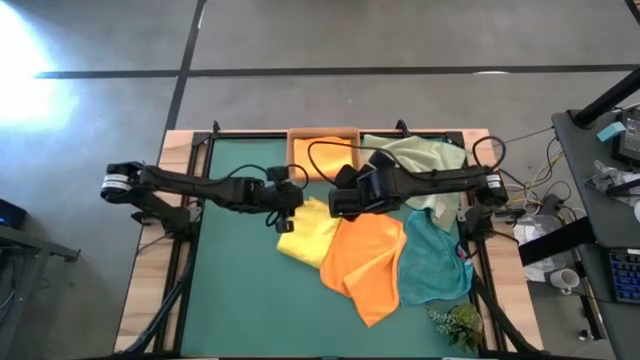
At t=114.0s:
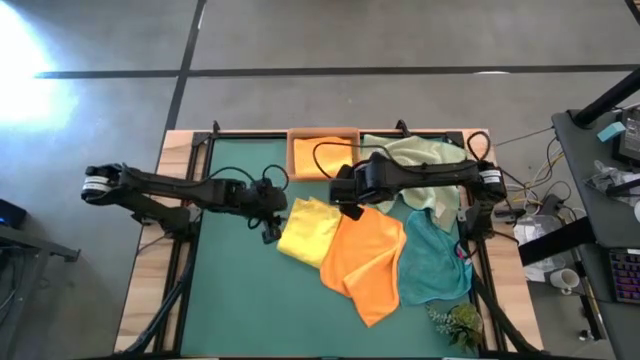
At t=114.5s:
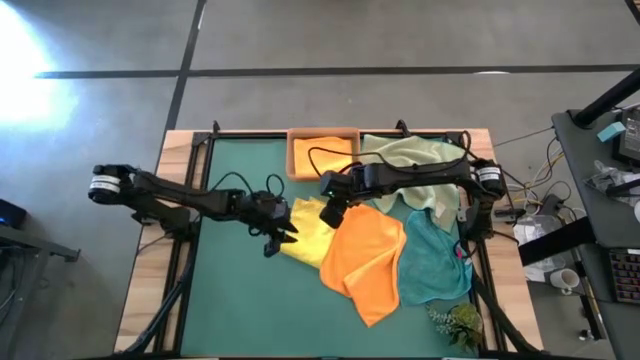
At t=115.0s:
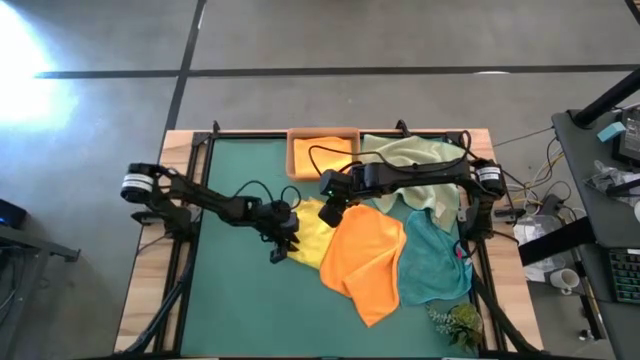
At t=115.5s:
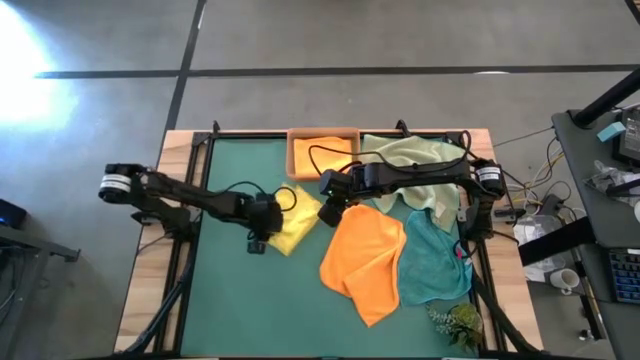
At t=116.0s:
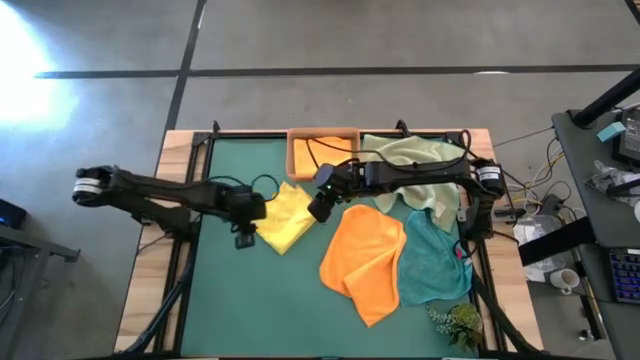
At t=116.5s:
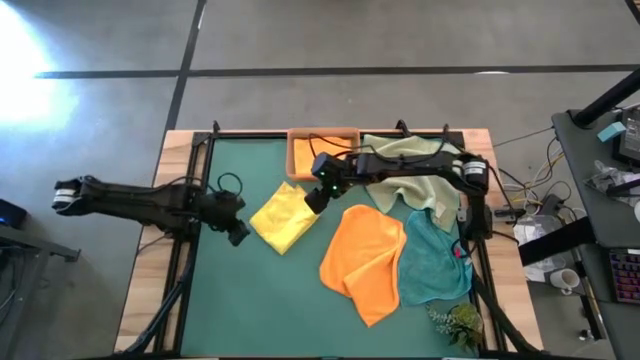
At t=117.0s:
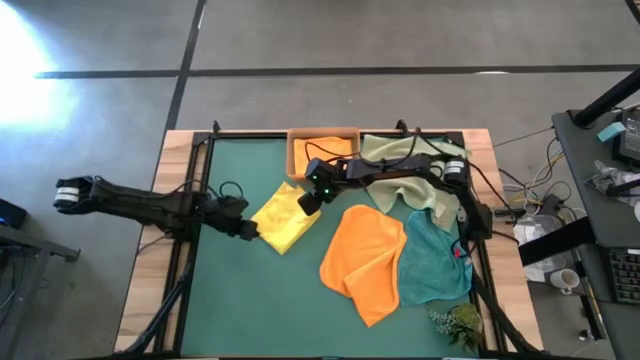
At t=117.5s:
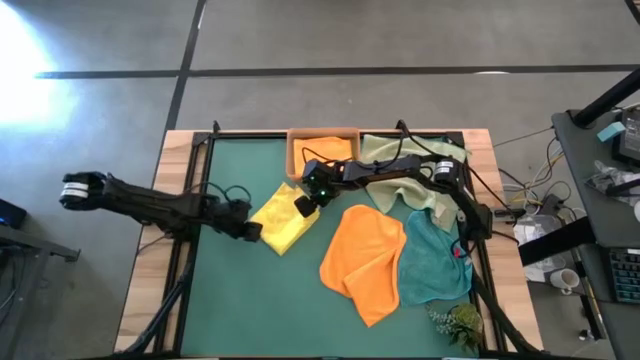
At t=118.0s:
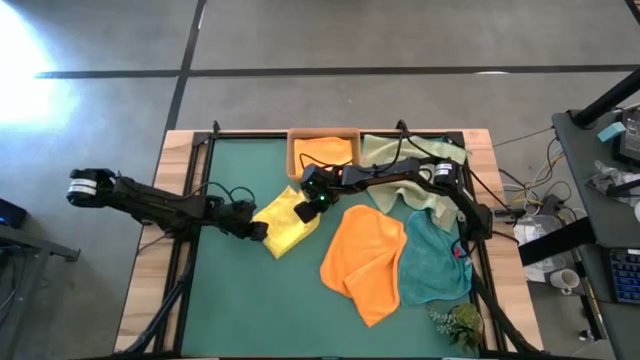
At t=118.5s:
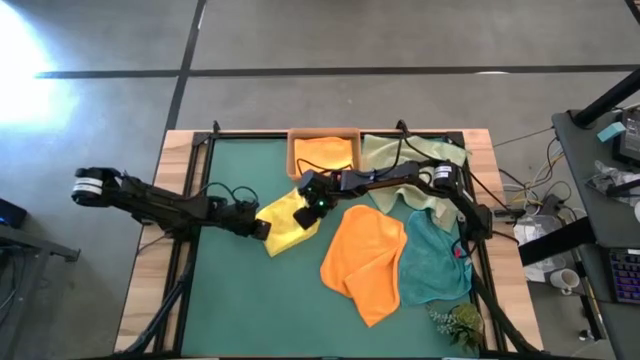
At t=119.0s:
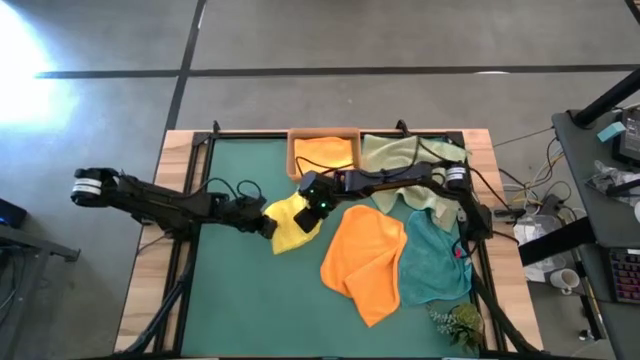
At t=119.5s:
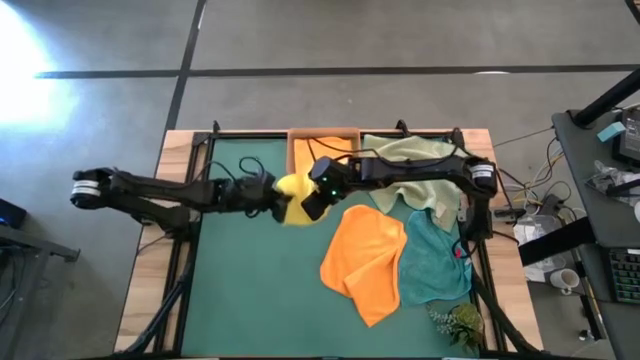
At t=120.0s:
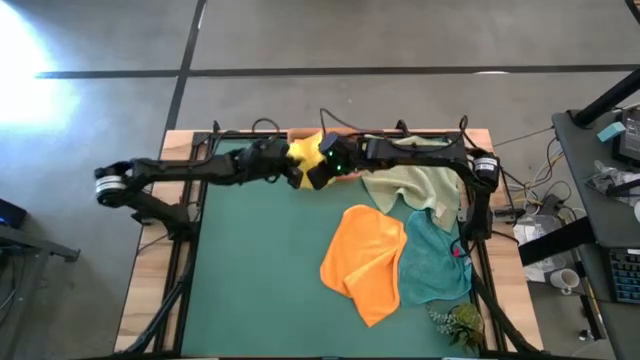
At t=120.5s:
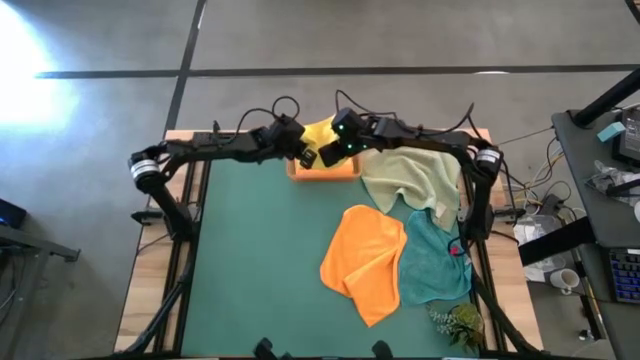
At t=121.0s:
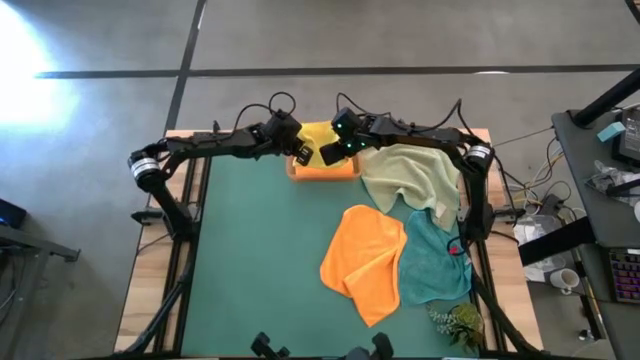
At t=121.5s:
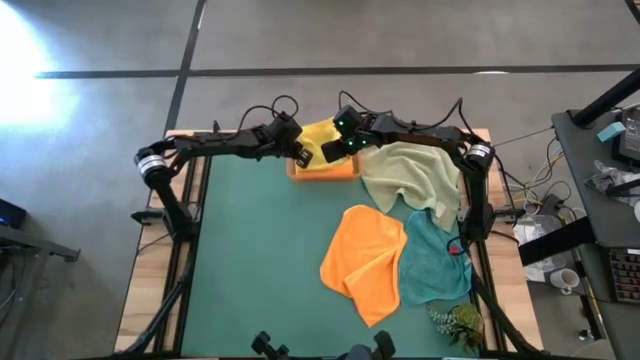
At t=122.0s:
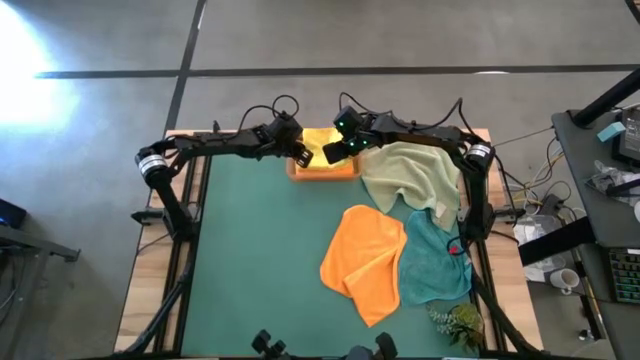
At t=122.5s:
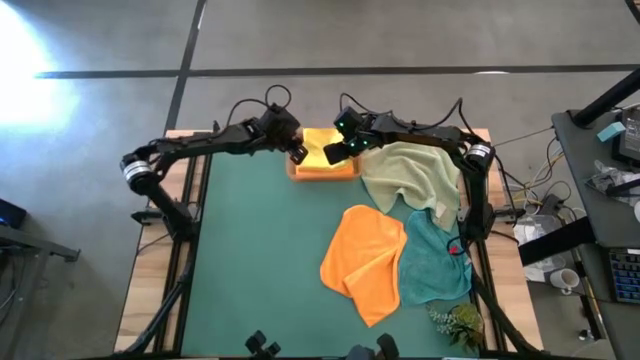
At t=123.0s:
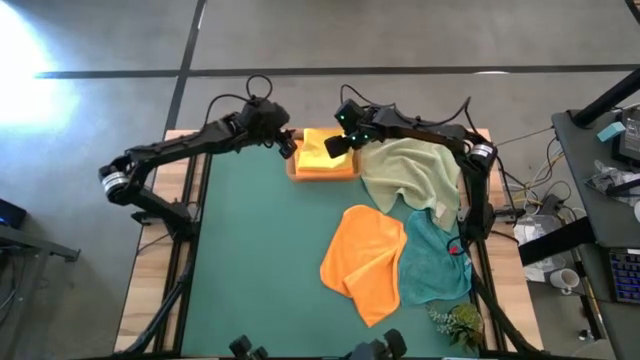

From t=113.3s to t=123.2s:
Task: Fold microfiber towels
Put the yellow towel into the orange bin

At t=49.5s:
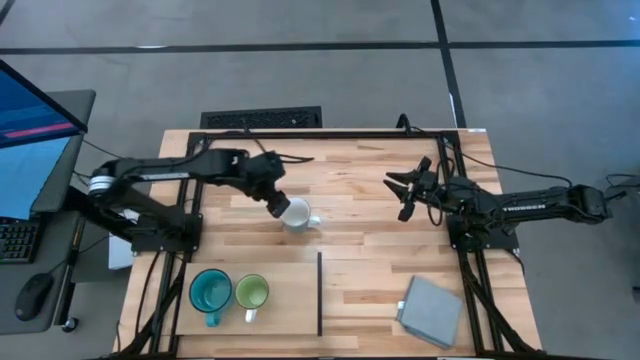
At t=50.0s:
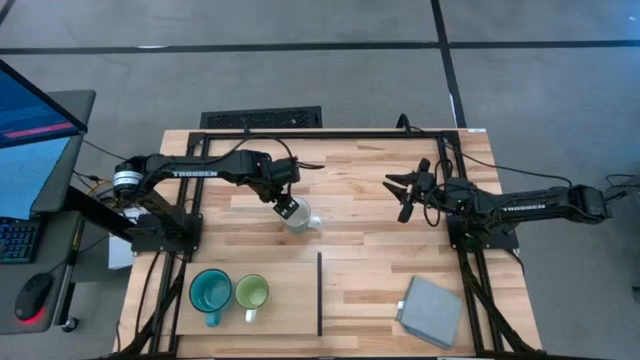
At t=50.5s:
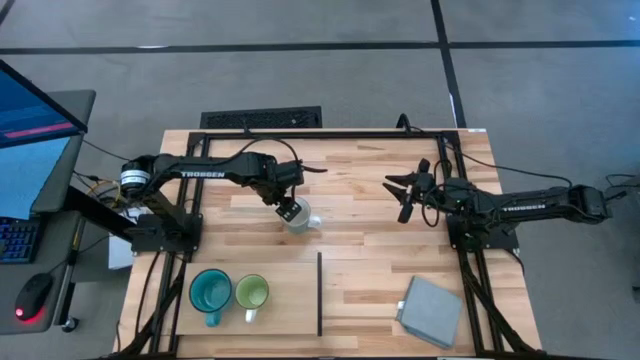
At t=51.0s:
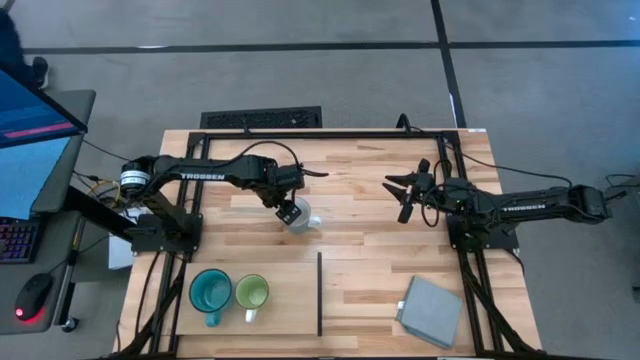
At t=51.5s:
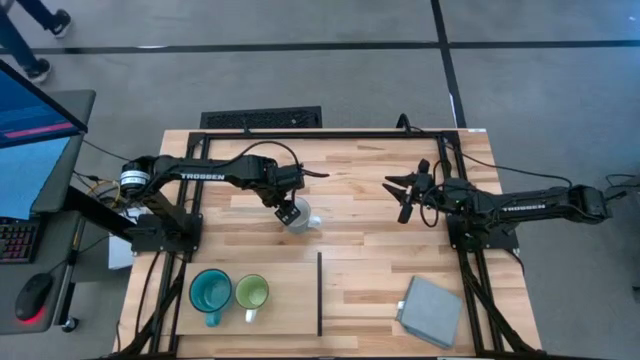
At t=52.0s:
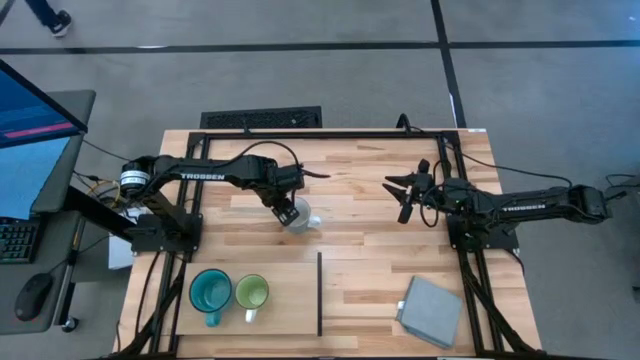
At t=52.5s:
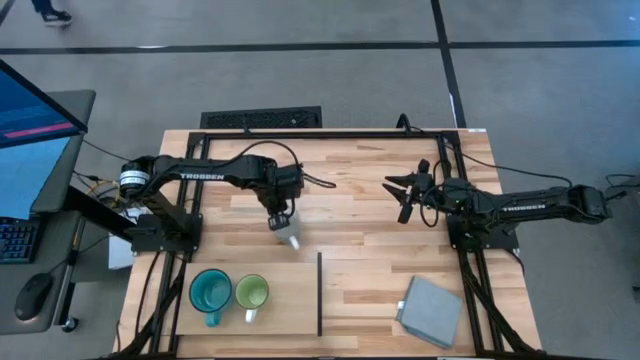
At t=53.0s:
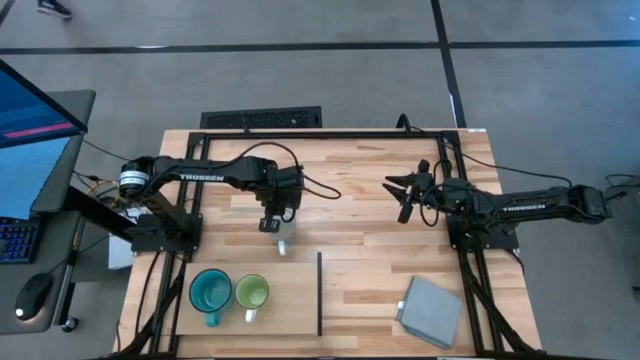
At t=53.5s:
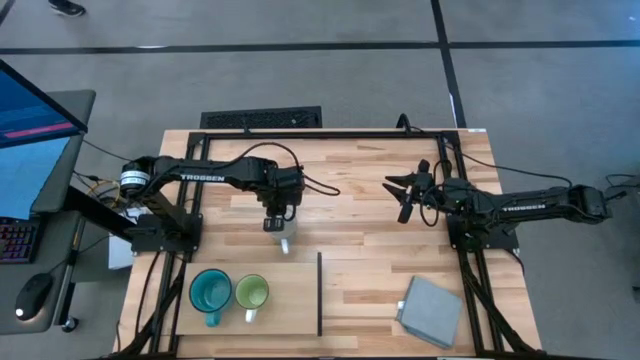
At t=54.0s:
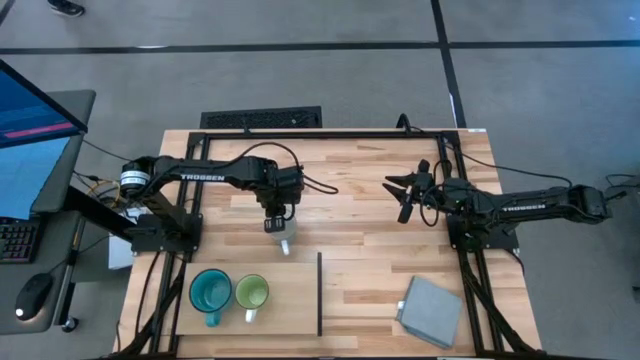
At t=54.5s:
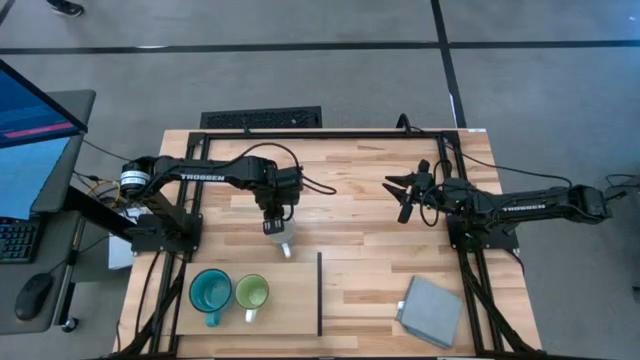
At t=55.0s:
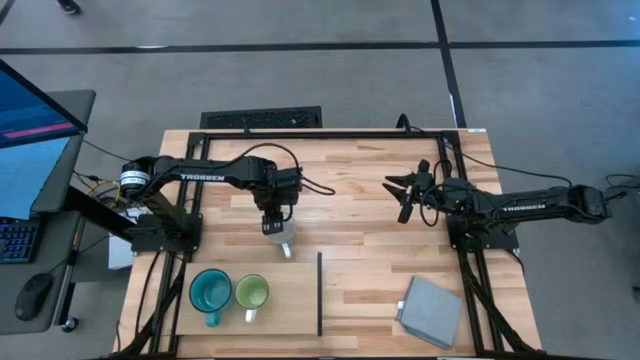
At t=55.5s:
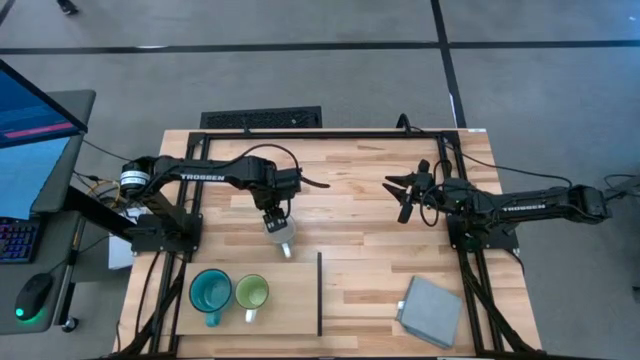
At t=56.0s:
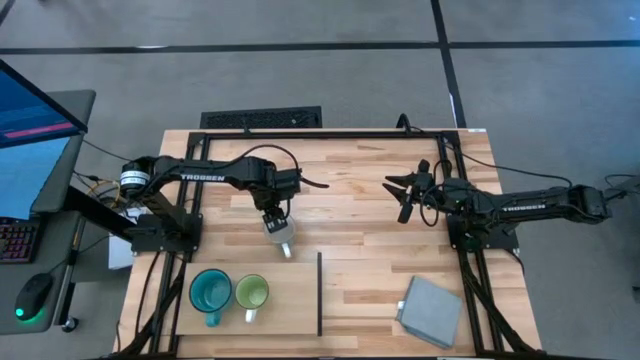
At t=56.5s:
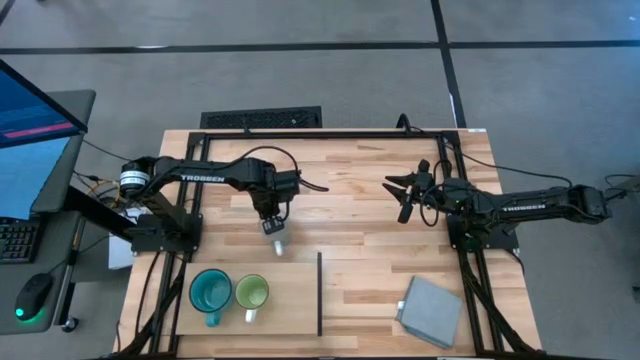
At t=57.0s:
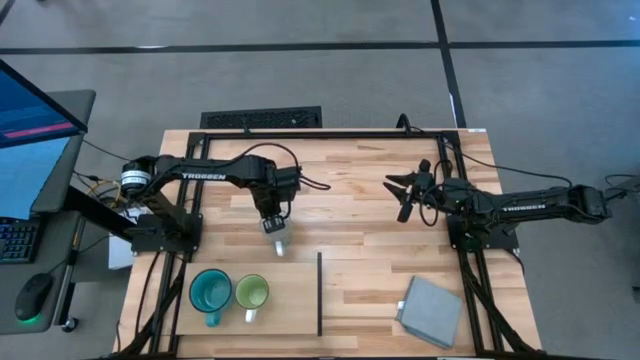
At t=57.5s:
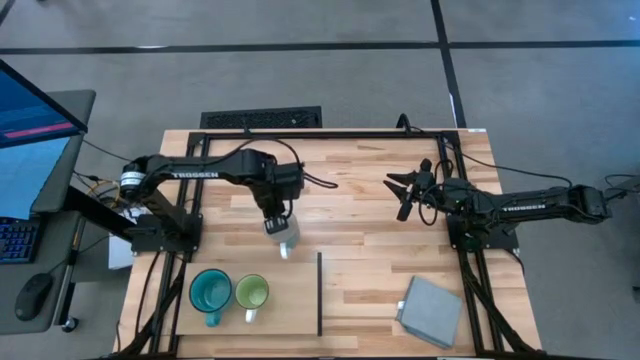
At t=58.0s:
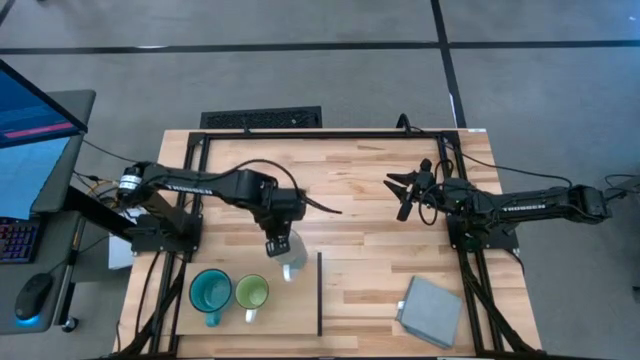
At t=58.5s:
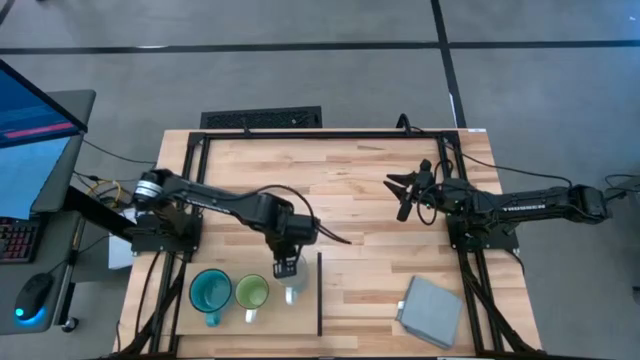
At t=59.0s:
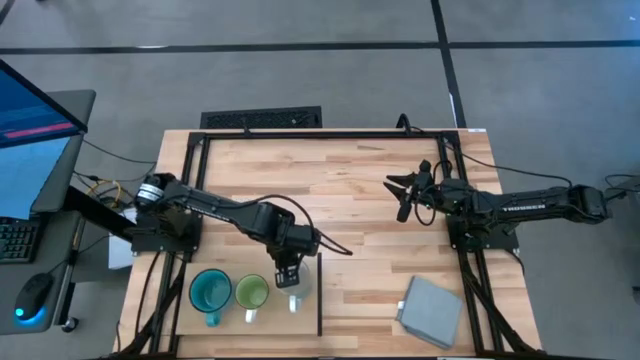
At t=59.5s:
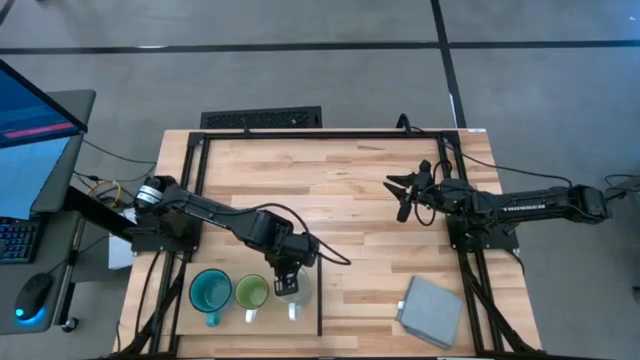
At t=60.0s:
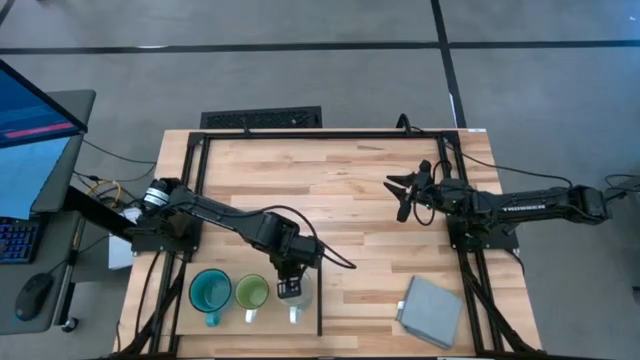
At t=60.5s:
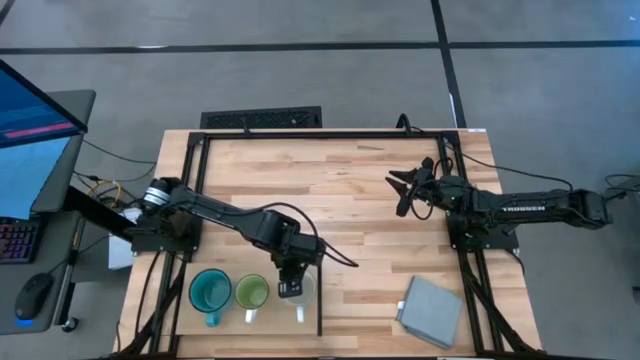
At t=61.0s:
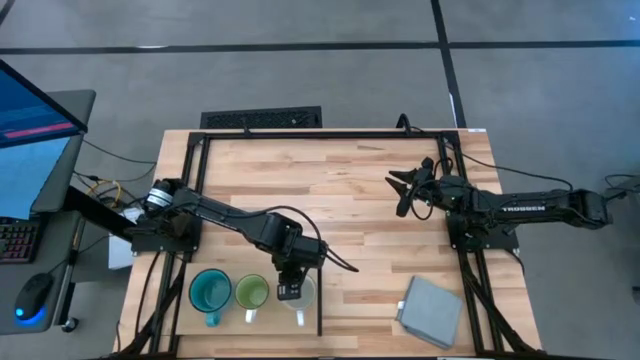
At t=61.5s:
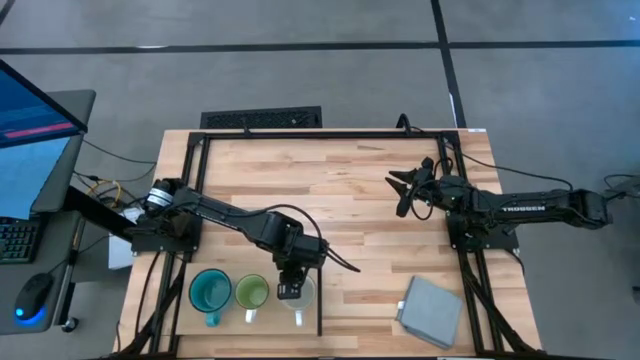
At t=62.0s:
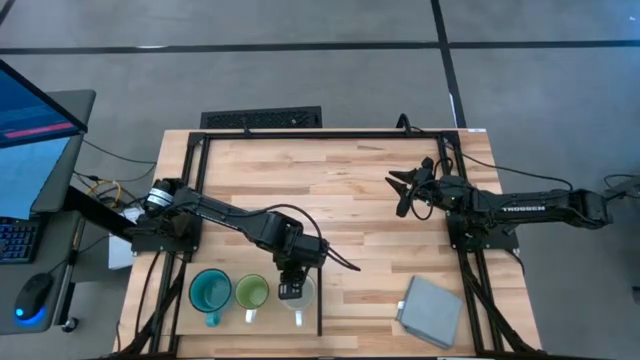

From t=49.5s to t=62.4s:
Task: Stack small to large cups/mugs on shelf
Put the white mug on the shelf
